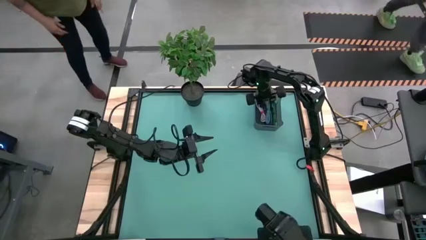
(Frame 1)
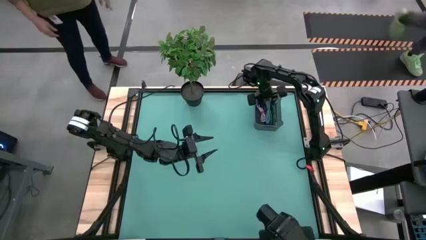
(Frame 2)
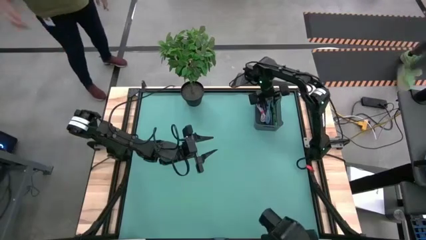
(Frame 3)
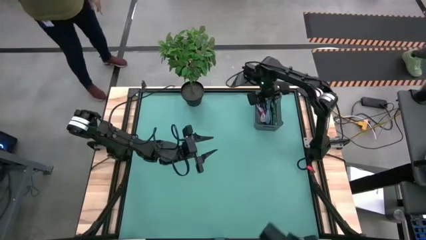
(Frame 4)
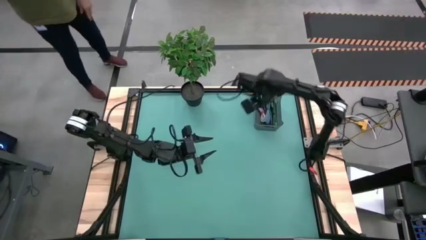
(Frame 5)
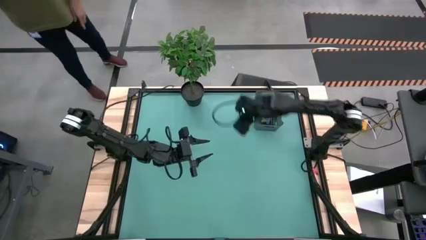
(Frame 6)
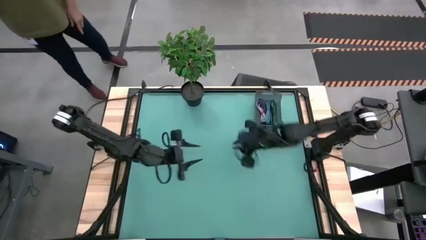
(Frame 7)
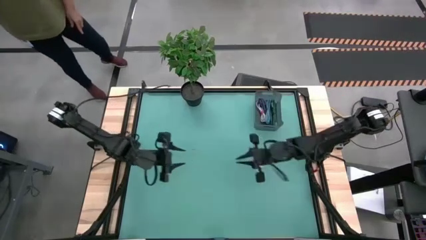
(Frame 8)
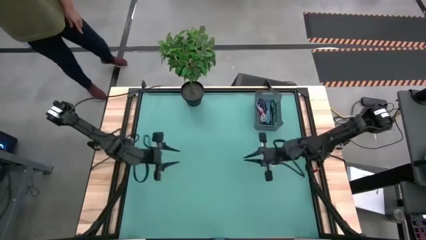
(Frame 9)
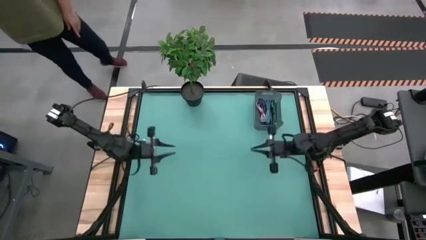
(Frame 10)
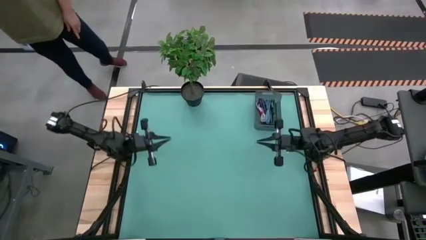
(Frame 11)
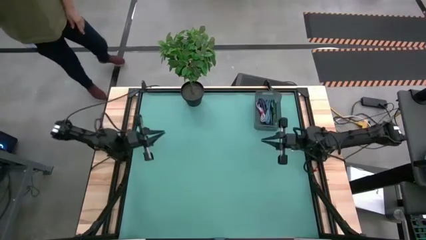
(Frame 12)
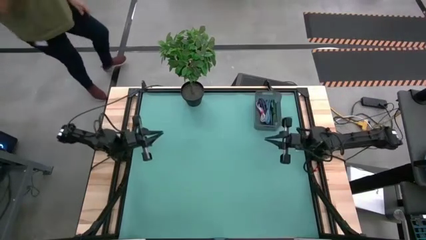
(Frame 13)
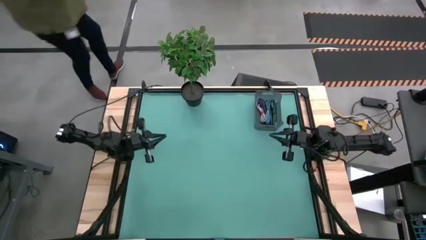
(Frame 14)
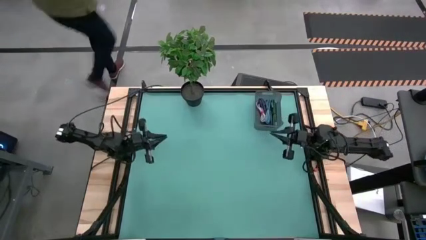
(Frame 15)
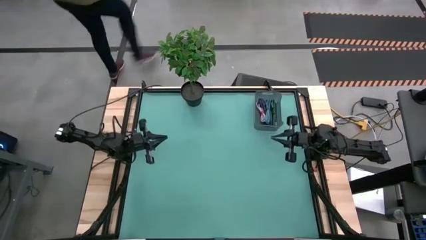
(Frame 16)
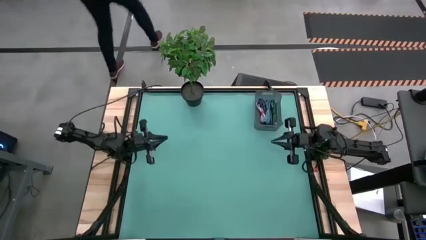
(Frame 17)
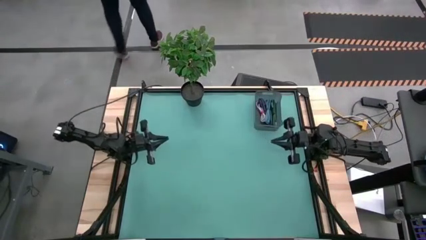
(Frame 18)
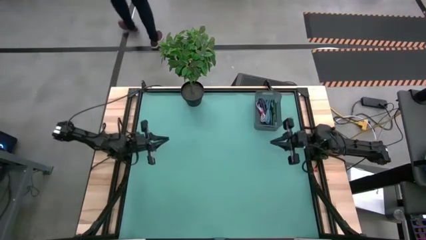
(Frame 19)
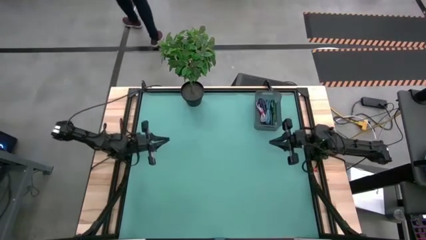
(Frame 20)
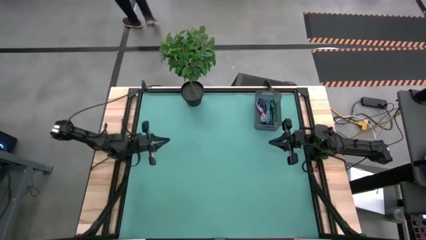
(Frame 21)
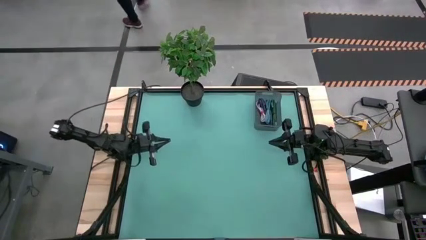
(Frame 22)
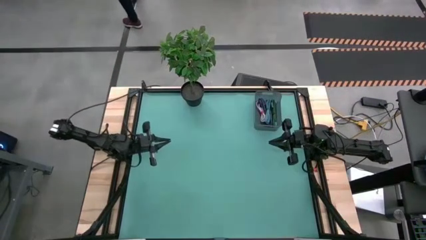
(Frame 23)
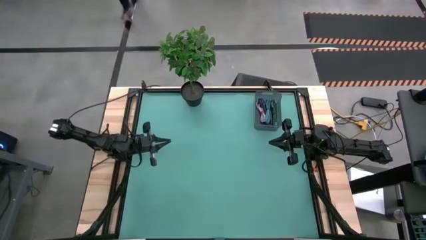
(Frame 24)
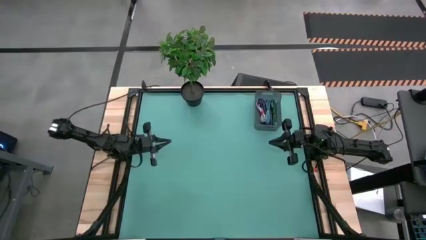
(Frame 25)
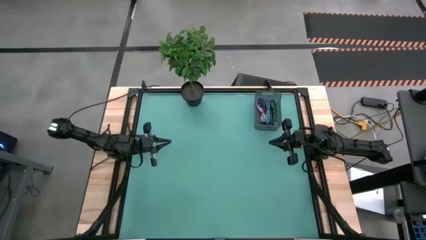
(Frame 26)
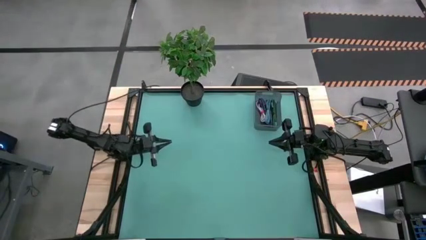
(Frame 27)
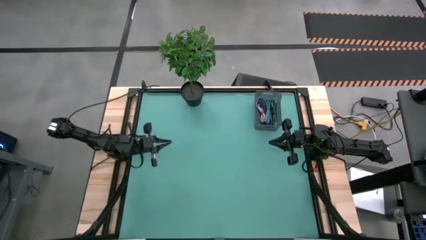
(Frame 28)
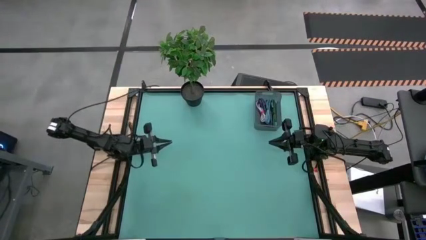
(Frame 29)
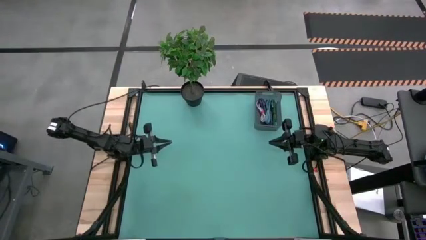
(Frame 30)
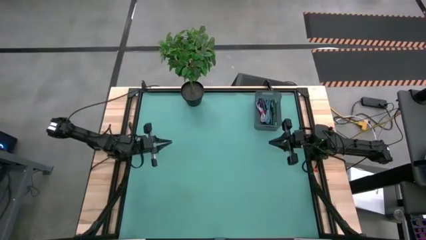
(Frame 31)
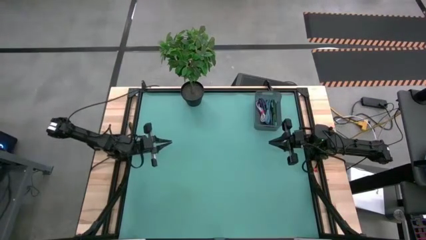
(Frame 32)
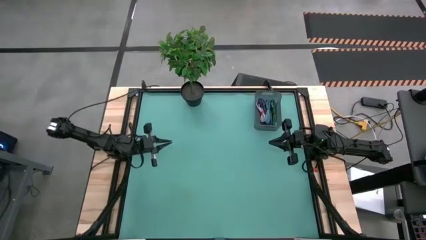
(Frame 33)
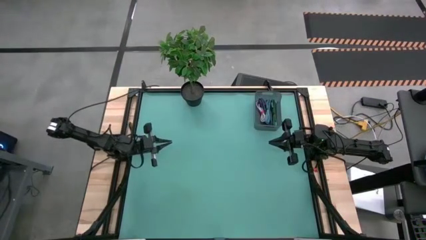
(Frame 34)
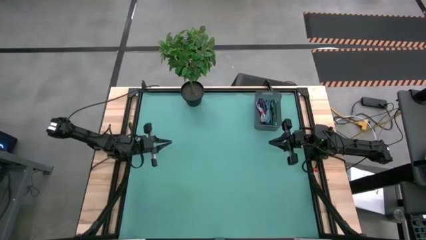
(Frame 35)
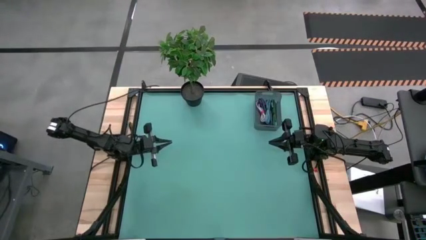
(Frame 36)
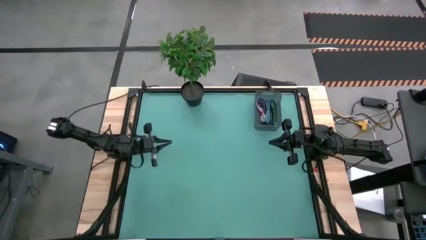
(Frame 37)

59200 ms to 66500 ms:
Task: Pick and place USB-C Cables
Return to Home Position

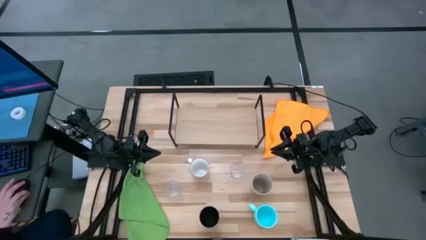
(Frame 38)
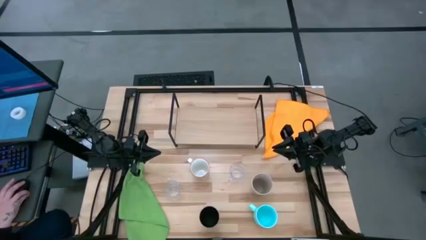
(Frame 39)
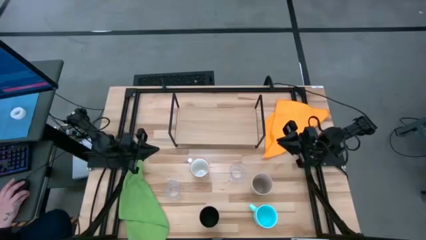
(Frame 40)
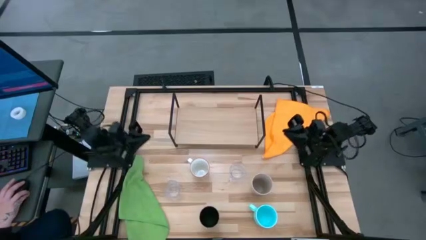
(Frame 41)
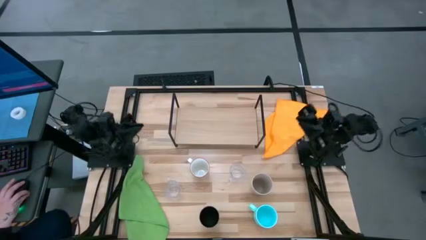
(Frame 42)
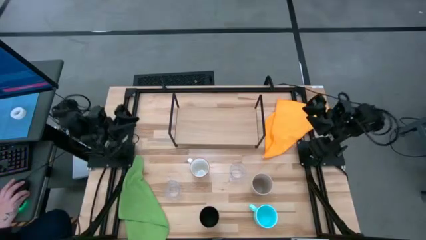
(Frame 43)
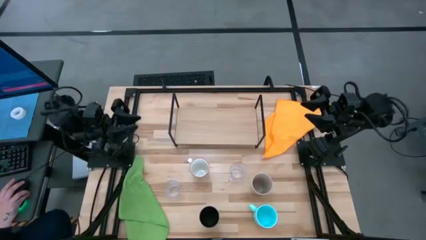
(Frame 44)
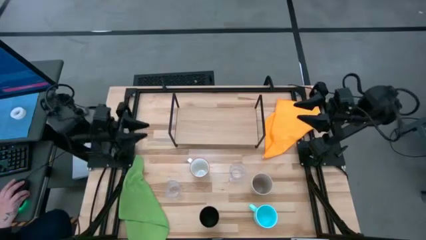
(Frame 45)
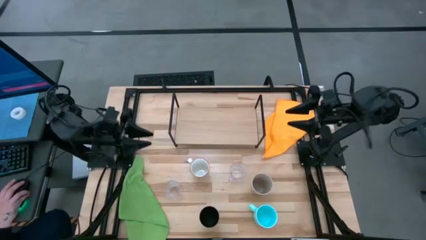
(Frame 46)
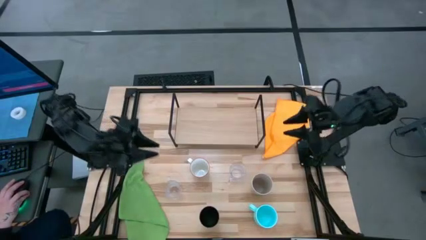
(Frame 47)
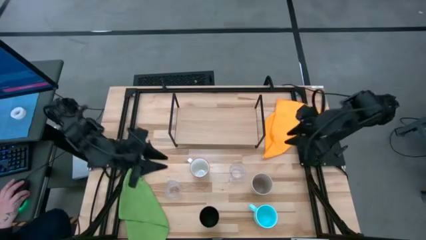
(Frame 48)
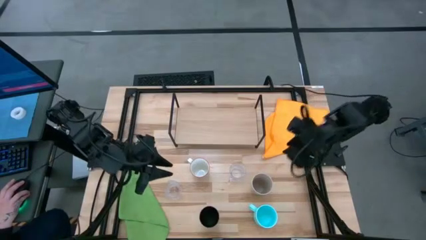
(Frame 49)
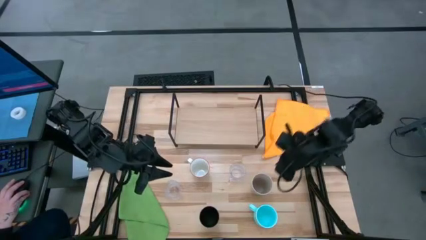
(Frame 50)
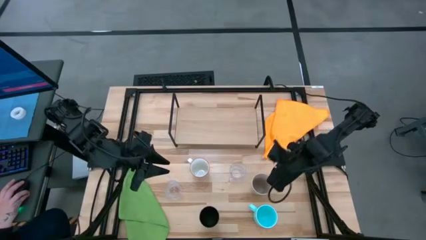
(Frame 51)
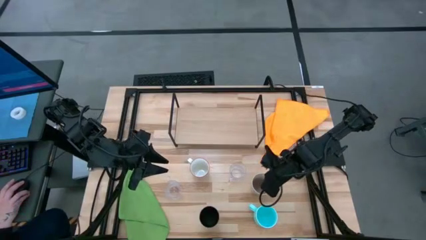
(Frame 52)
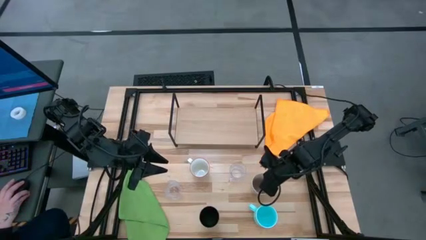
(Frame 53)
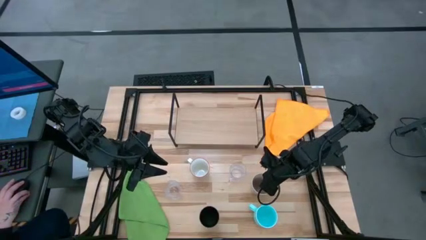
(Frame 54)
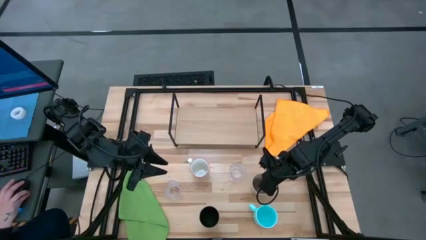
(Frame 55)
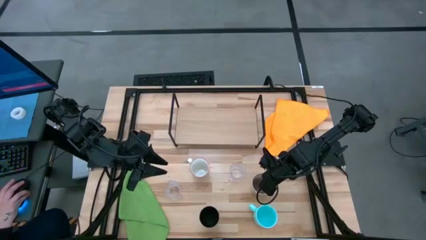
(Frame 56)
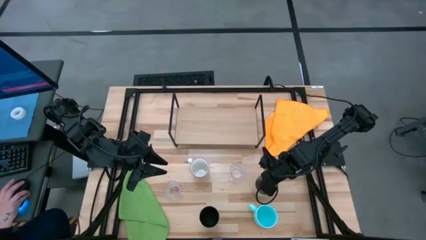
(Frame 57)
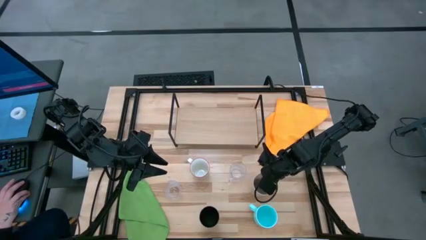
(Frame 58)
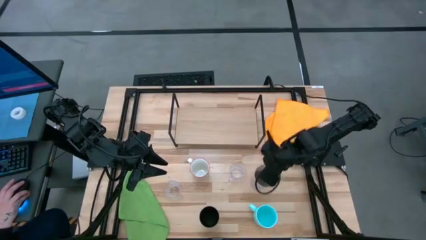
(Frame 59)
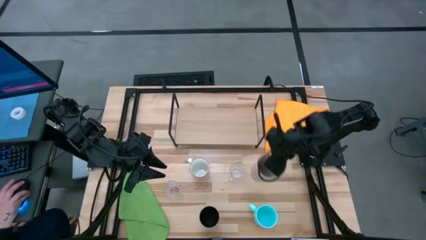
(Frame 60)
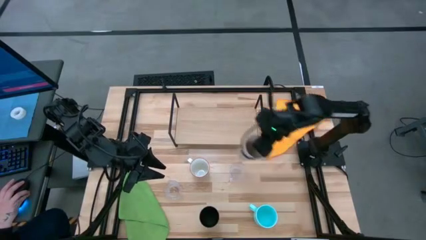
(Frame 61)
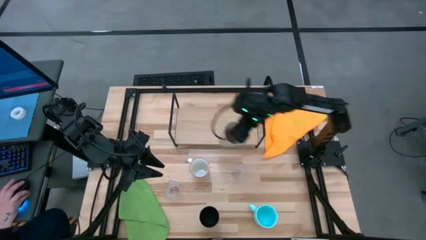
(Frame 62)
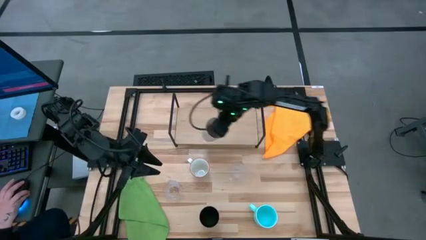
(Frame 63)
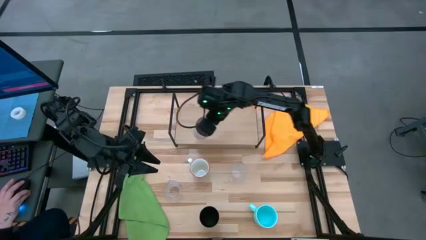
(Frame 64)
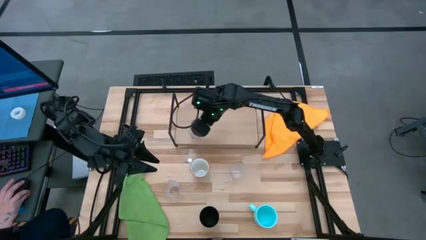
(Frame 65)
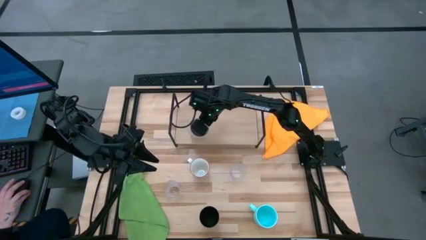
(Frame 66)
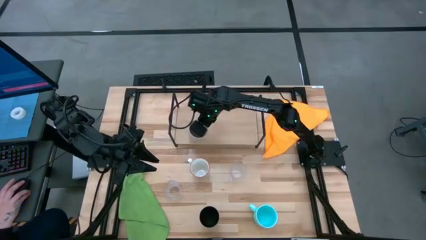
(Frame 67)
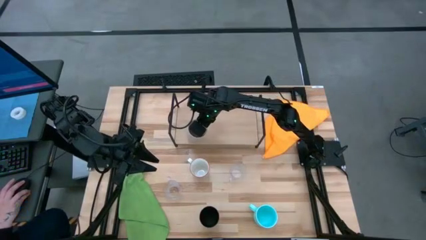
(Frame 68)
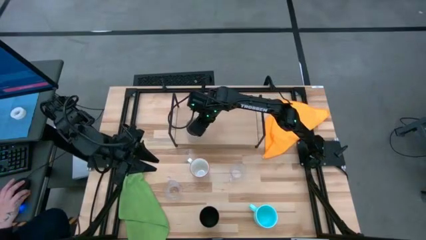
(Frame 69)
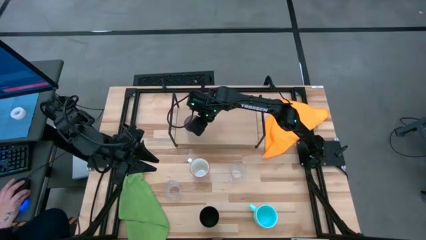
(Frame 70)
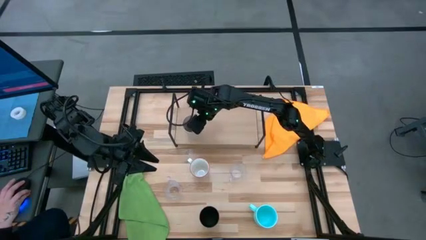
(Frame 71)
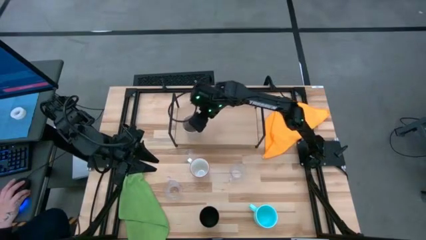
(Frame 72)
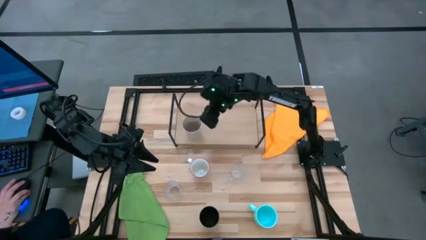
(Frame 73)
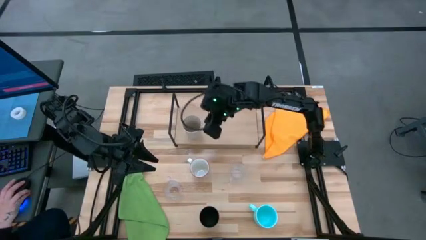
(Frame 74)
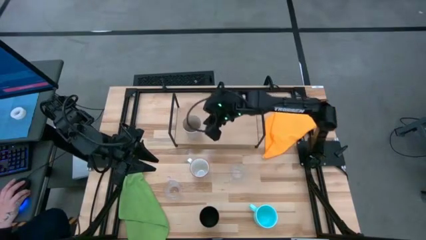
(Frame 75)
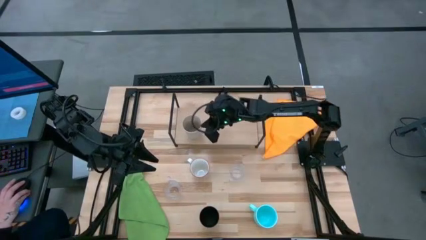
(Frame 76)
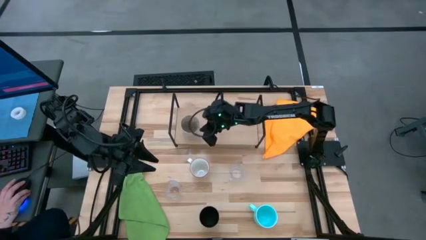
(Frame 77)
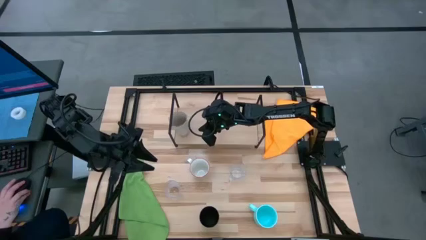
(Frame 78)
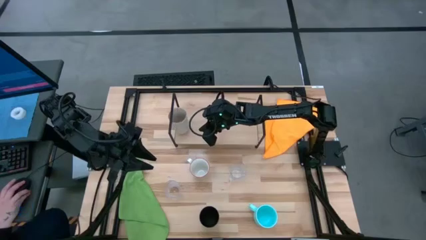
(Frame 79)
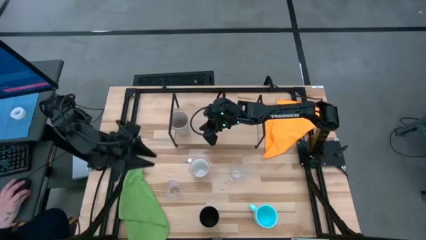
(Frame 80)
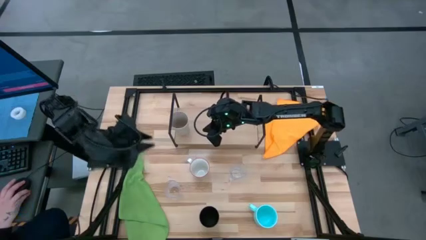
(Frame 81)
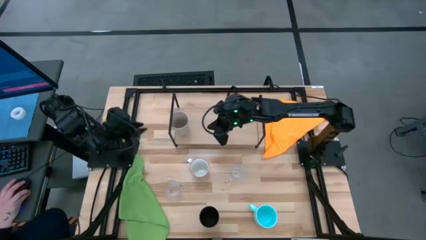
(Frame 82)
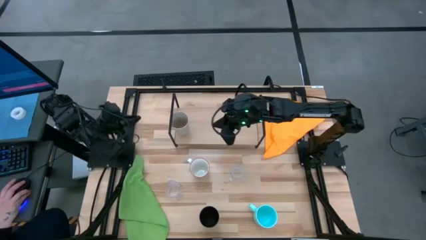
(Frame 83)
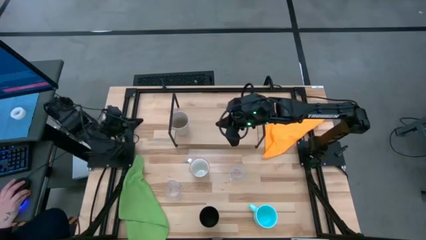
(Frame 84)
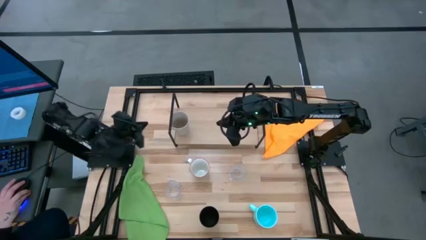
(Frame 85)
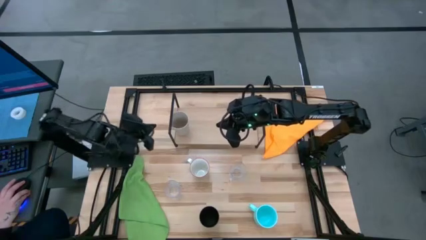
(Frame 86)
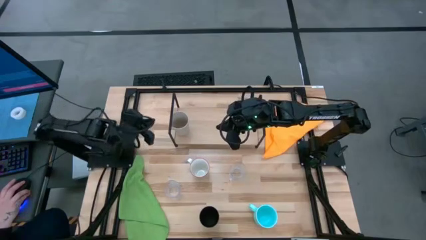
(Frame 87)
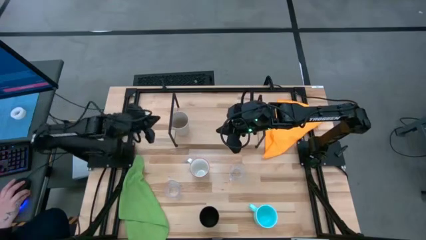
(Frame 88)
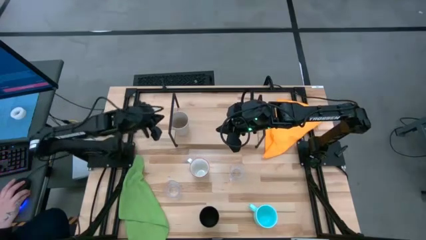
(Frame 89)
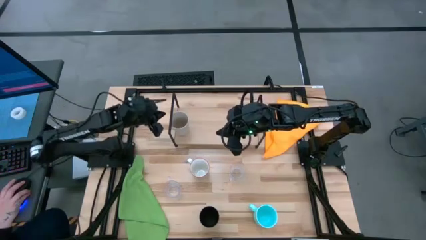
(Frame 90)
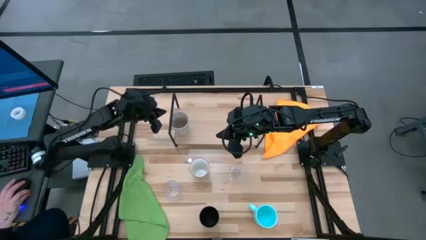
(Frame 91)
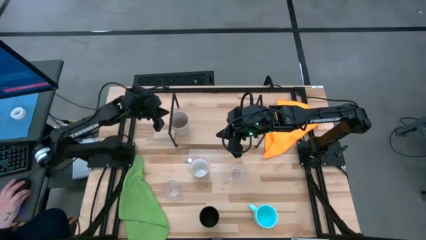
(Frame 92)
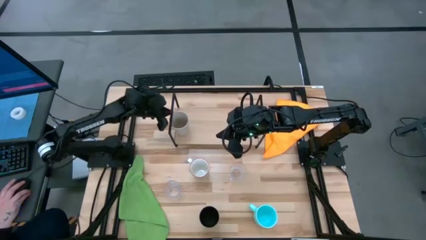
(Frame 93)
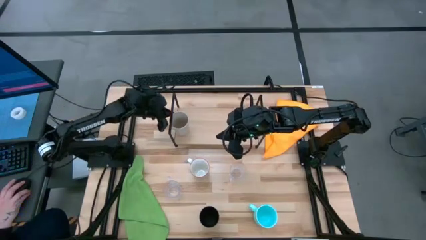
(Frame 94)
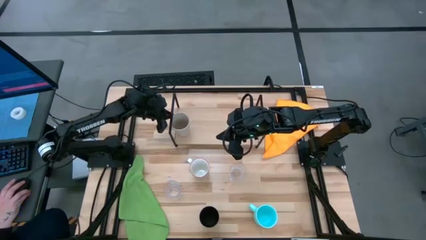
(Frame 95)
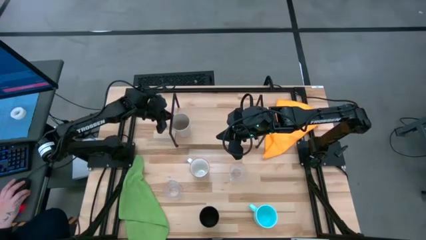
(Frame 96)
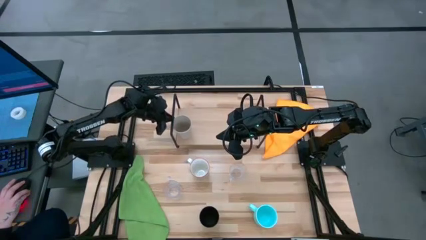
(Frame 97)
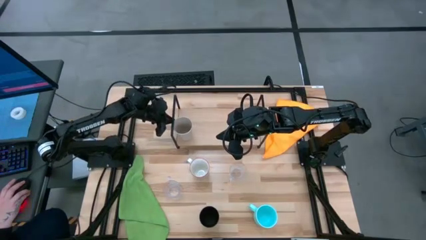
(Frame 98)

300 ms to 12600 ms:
Task: Stack small to large cups/mugs on shelf
Put the white cup on the shelf
